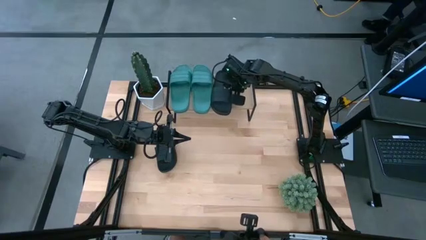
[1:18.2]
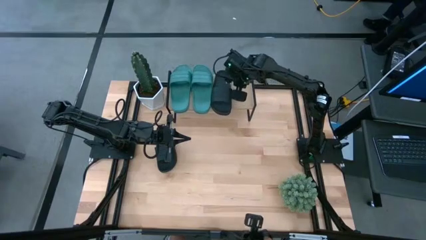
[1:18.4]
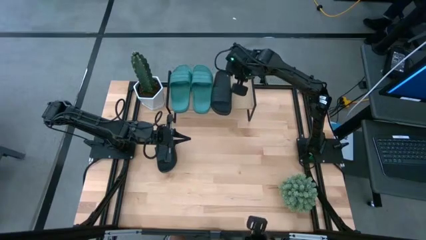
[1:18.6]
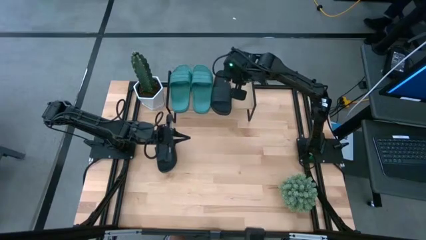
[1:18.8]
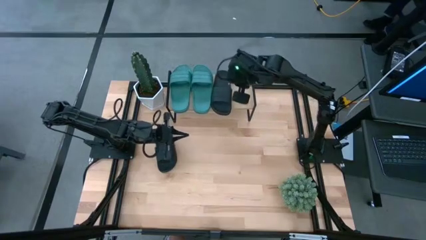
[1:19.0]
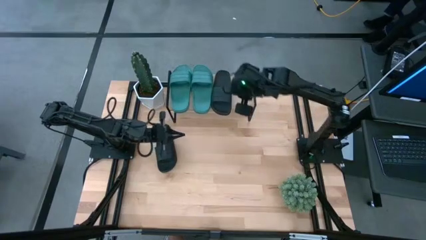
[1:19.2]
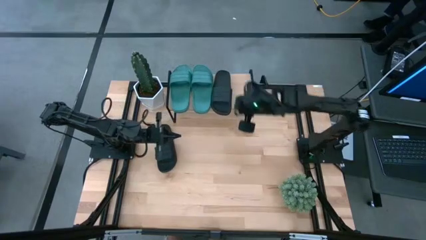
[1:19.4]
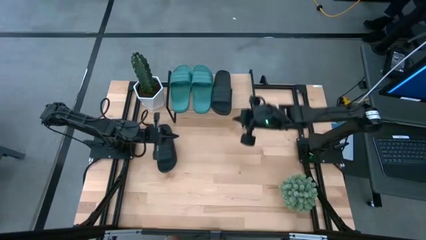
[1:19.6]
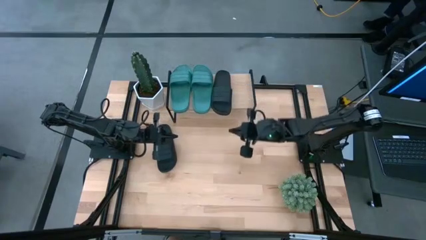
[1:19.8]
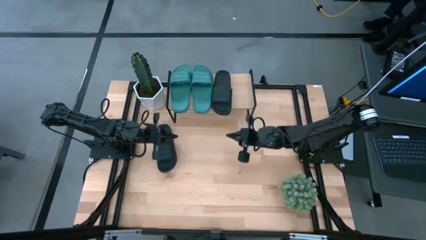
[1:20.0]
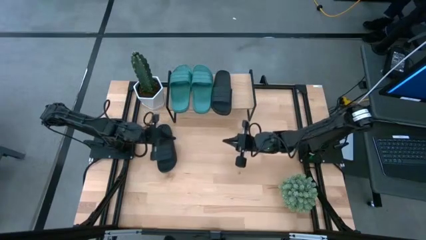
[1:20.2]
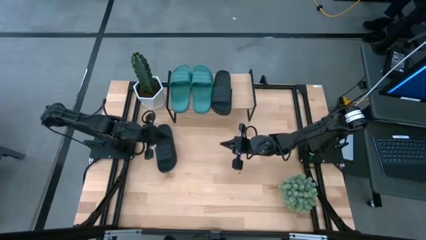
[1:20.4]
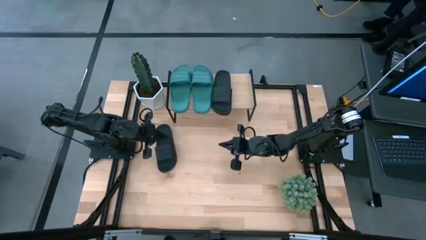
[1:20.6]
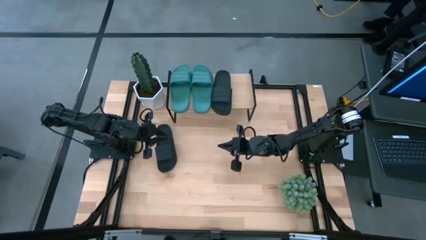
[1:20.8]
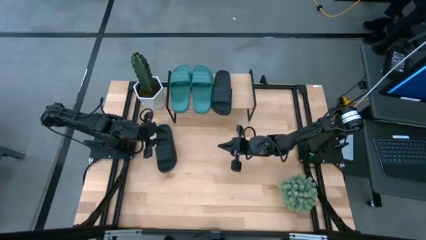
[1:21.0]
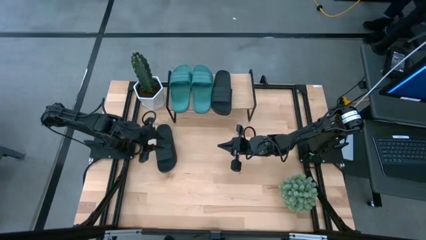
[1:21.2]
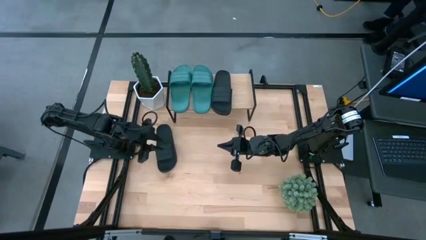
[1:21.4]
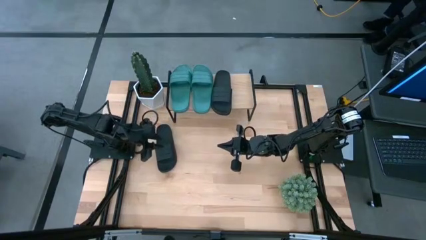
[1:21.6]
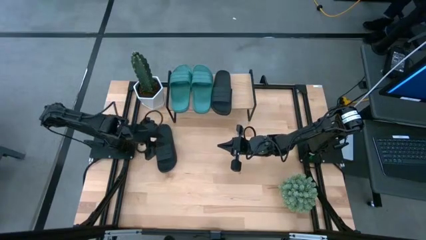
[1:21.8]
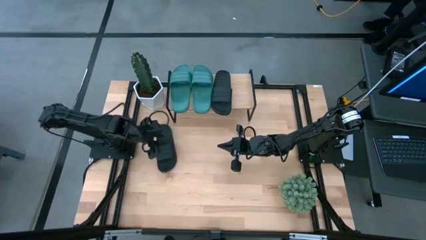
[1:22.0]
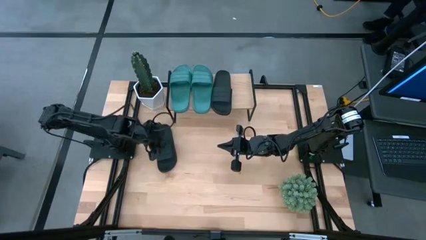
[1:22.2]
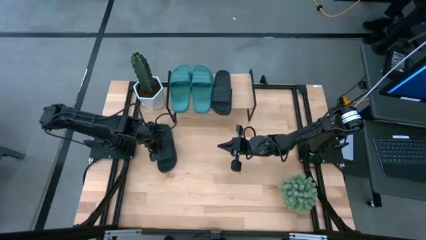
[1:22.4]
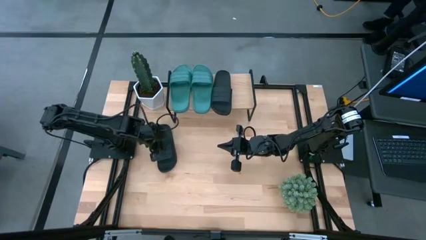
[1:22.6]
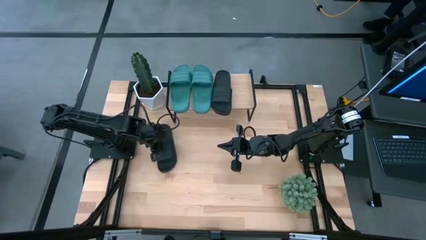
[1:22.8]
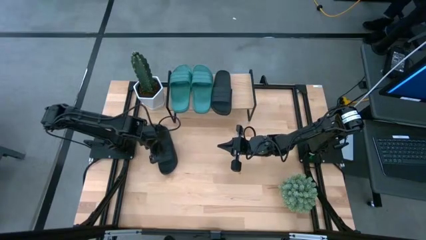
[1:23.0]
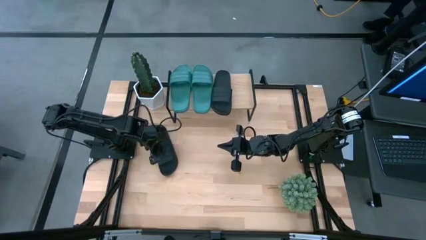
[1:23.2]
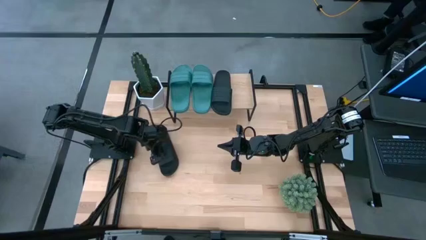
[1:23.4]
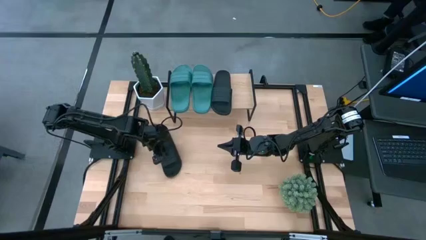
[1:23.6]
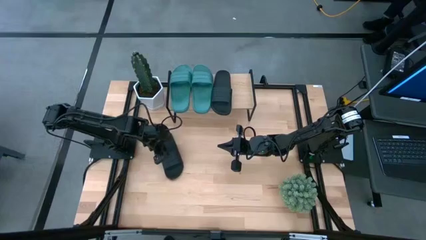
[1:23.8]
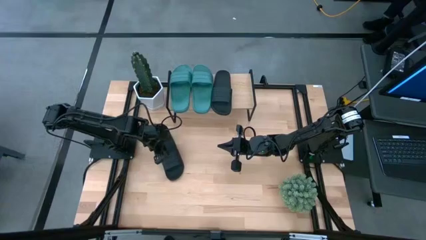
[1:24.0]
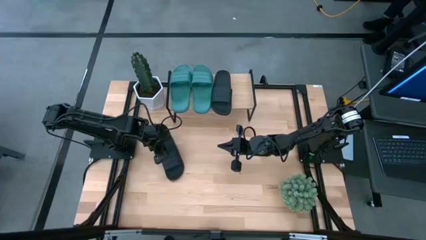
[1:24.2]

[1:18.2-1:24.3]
Task: Pick and place slides into the shelf
Put the black slipper on the shelf

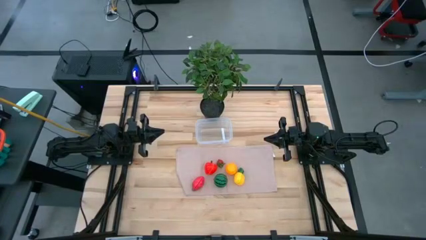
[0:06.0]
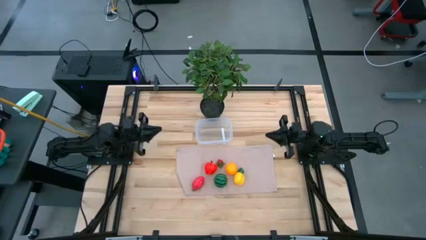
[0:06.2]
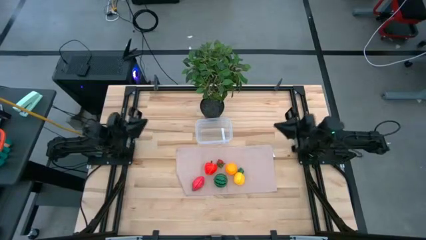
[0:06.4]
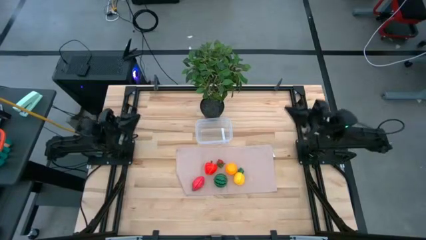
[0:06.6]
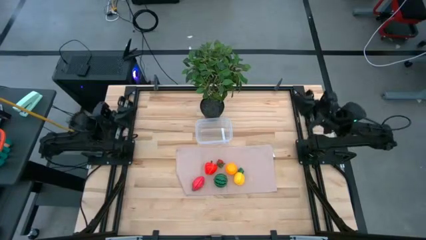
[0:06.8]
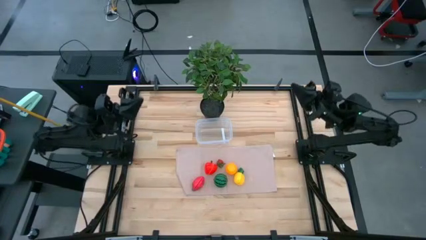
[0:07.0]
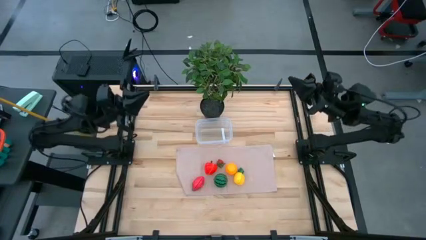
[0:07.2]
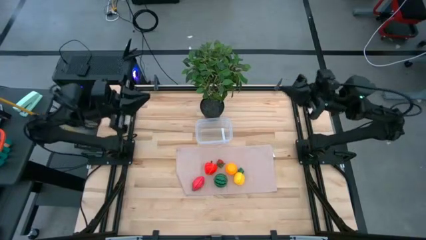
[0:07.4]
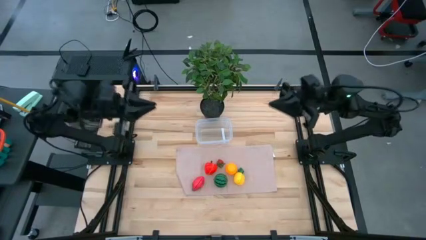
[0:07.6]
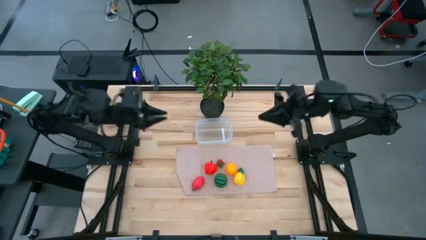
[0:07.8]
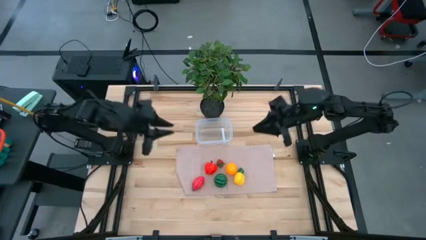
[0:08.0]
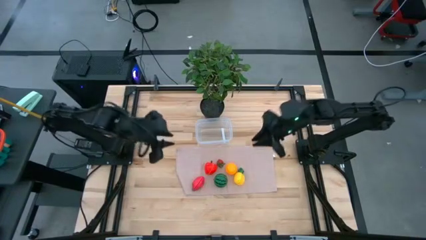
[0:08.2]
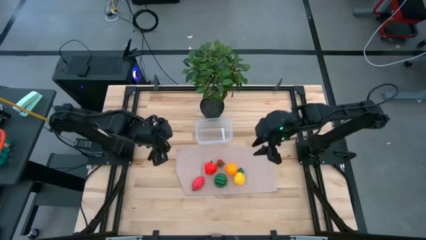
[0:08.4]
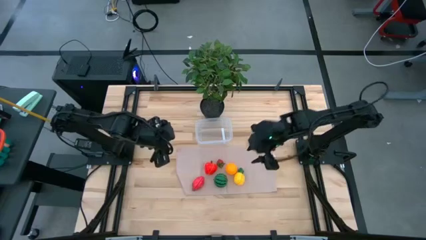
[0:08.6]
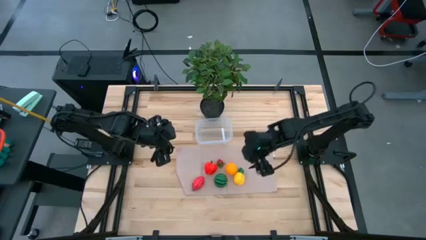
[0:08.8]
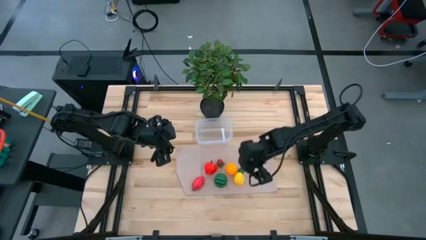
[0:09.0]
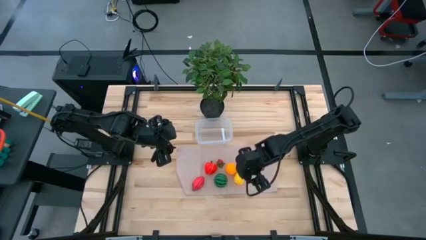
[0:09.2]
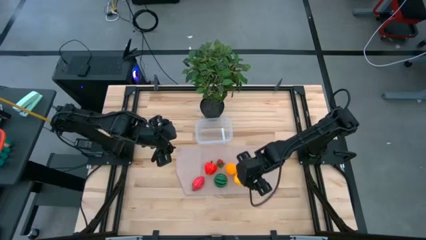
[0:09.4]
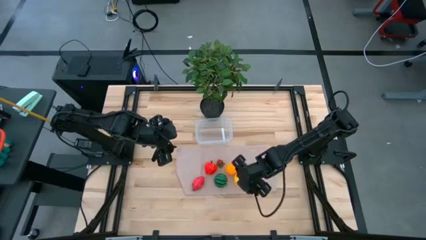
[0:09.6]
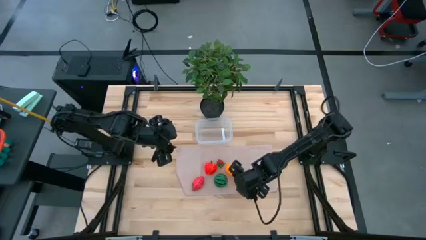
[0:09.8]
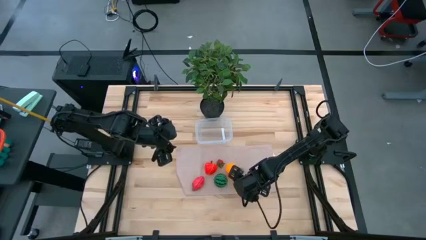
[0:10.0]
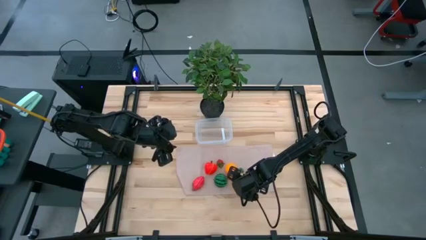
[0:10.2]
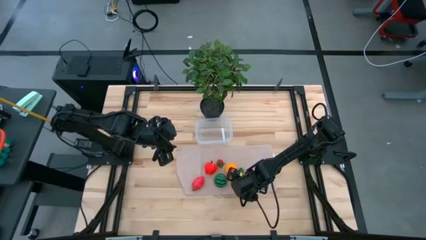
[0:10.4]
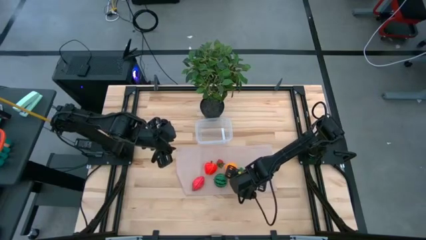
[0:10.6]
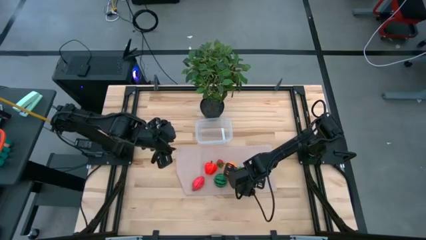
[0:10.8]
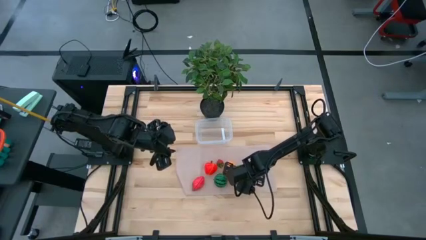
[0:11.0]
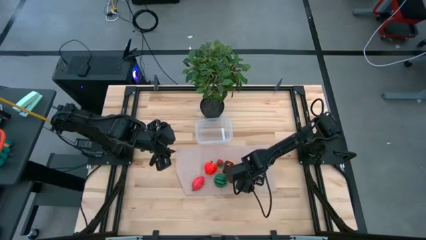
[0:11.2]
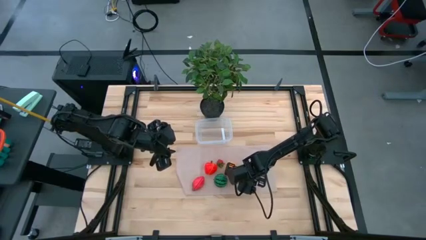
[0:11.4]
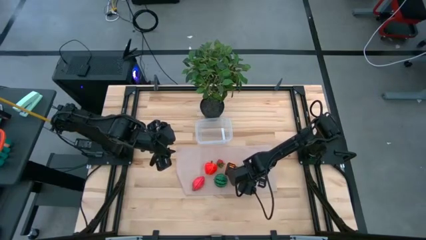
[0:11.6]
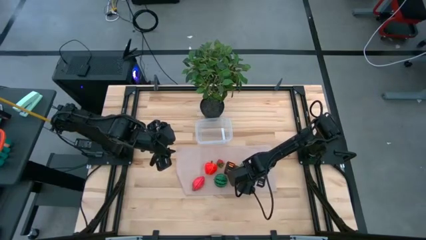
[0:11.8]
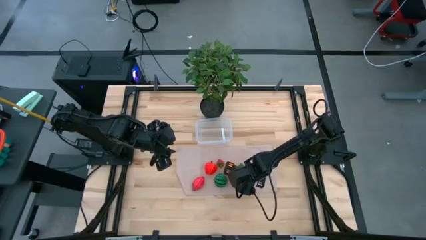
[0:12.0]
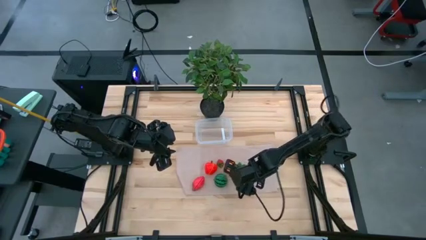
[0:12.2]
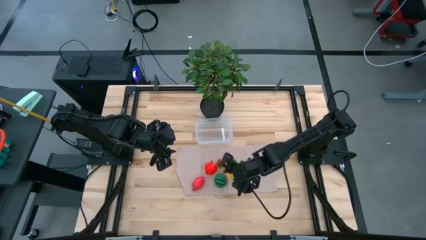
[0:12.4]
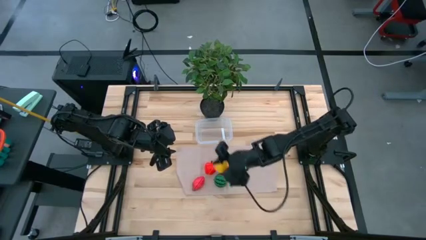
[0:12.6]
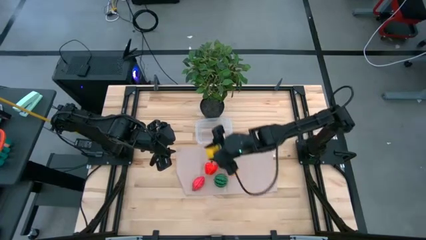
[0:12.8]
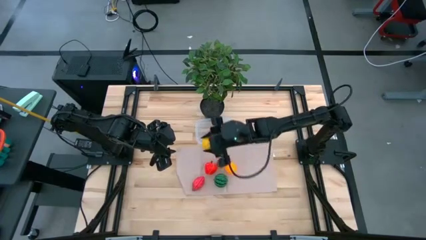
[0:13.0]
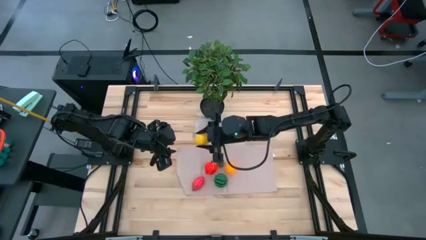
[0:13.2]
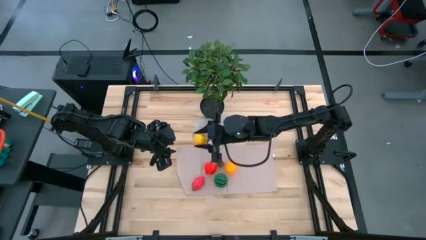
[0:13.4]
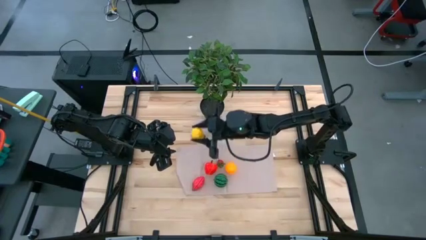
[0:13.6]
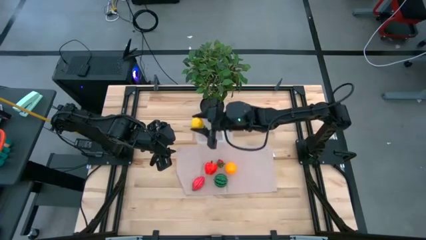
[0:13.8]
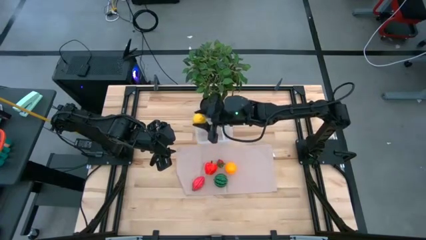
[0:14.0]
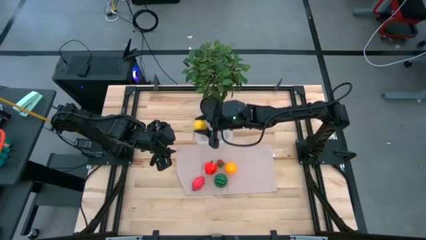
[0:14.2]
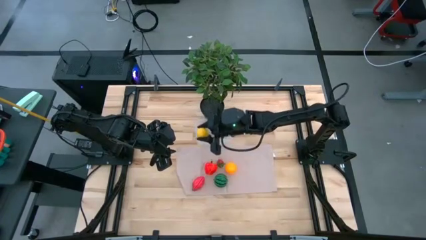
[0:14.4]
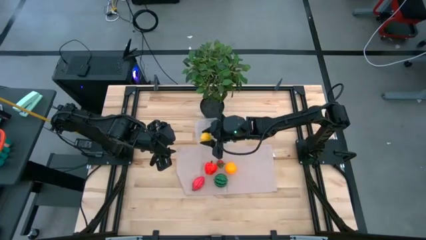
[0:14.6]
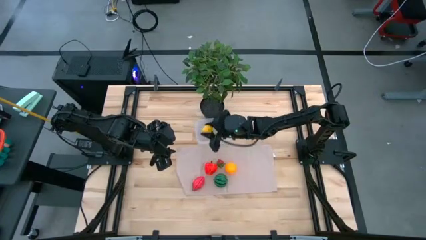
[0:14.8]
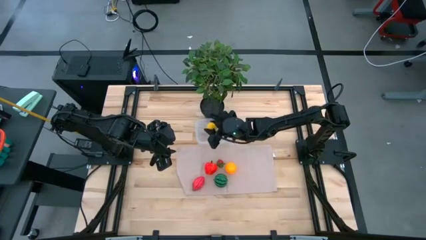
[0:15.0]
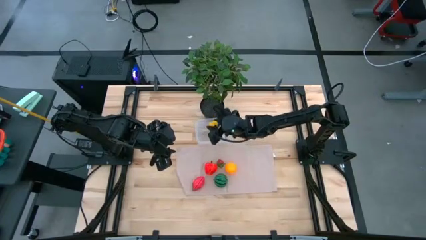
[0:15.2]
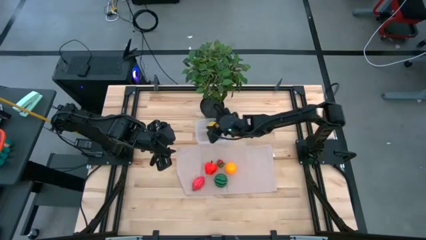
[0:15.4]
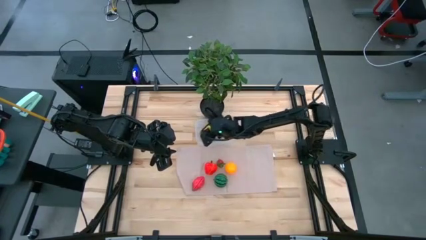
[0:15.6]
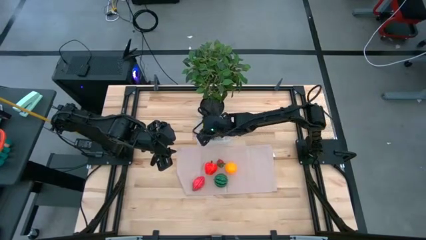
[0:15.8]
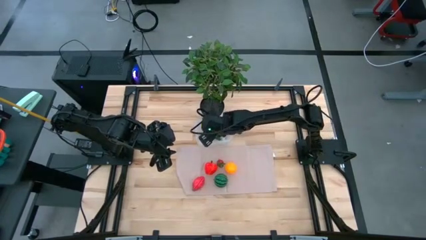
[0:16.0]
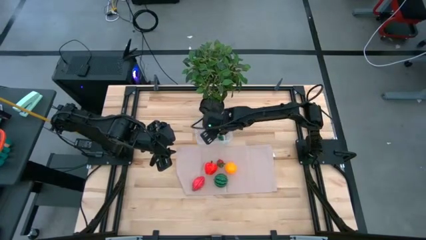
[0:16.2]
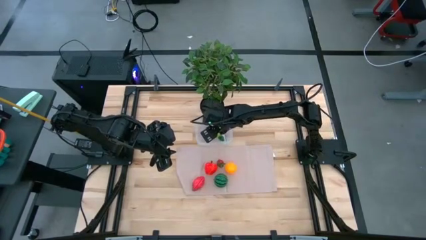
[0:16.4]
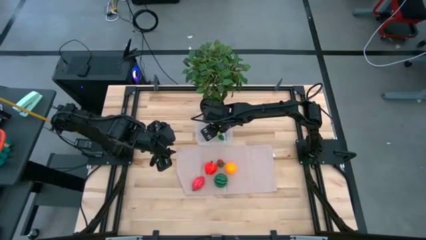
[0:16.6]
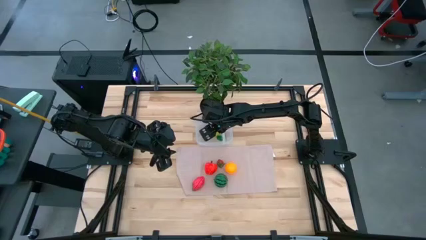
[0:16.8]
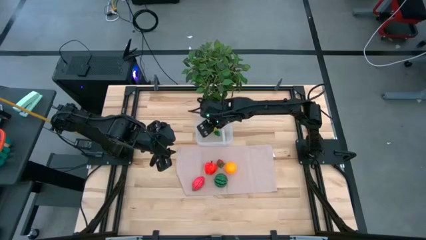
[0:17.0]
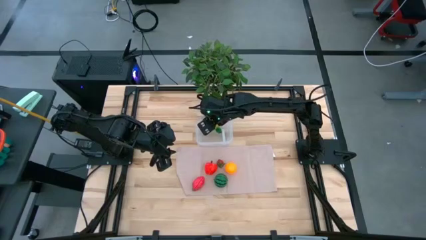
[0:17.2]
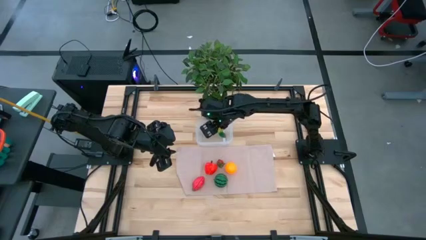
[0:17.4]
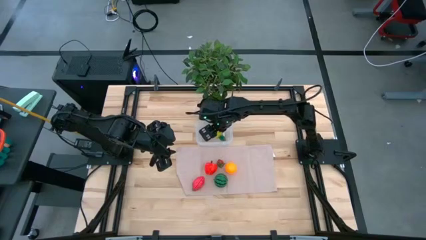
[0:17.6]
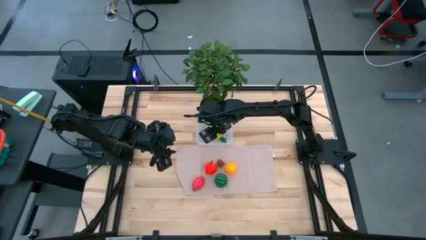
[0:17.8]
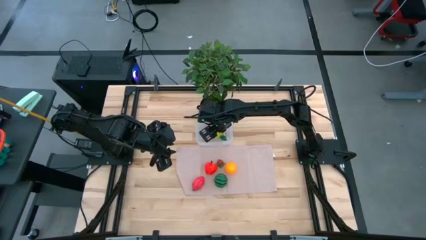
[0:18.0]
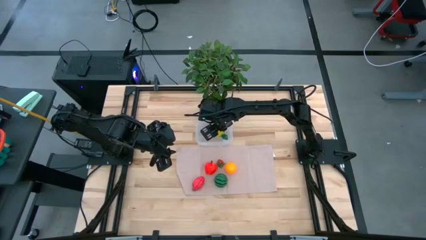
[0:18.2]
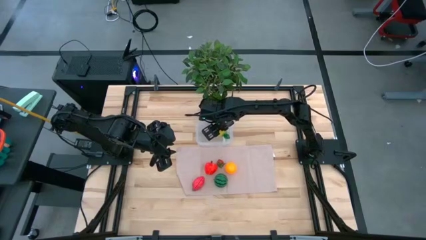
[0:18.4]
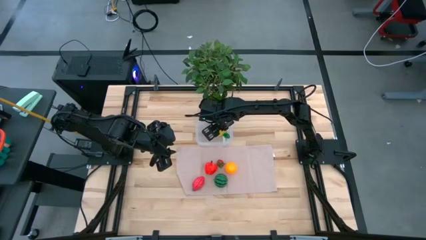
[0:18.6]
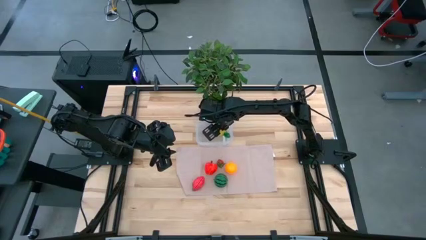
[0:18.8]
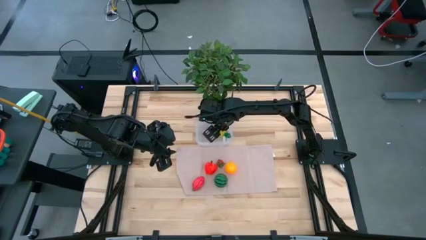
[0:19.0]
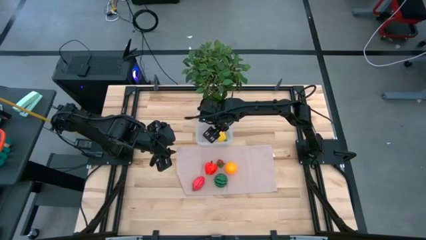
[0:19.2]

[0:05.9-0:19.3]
Task: Pick and placing Produce into tupperware
Put the pineapple into the transparent bin
